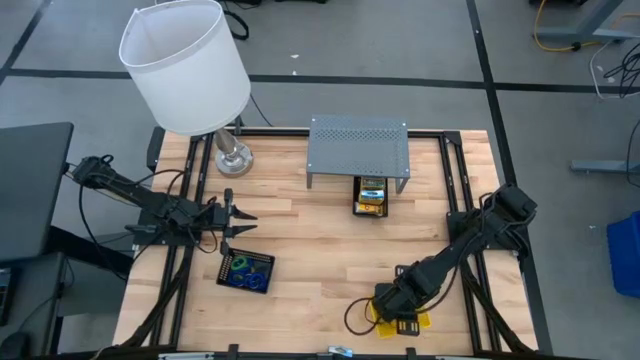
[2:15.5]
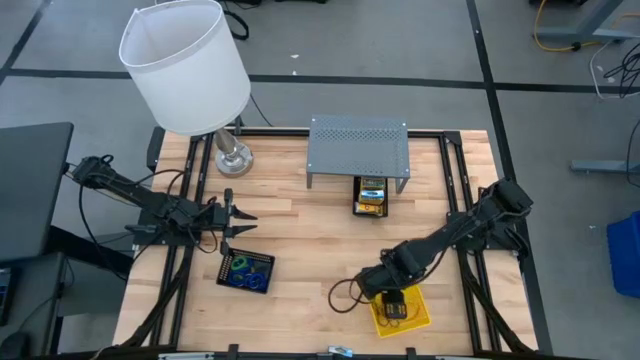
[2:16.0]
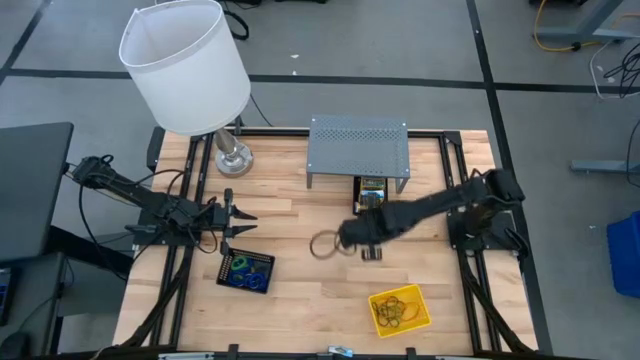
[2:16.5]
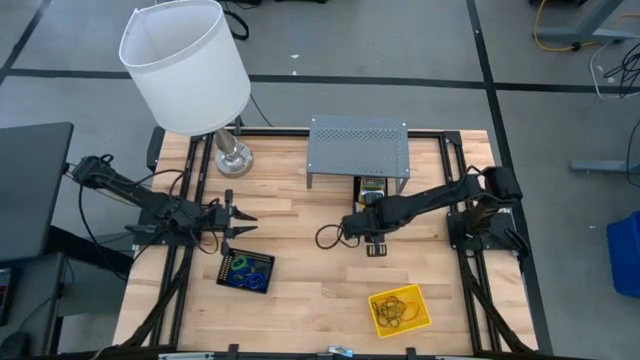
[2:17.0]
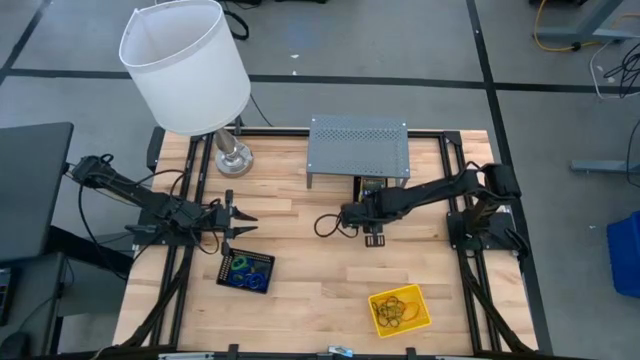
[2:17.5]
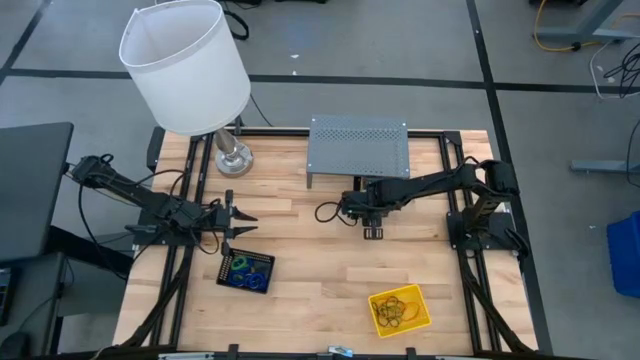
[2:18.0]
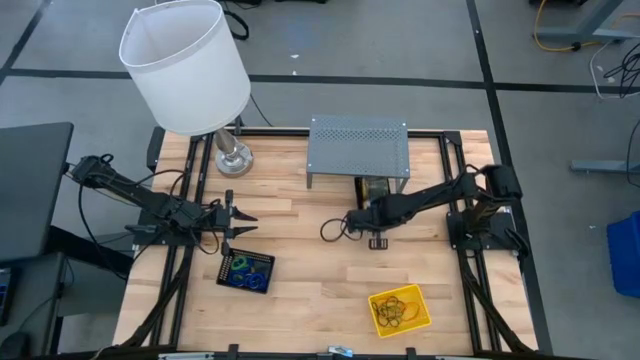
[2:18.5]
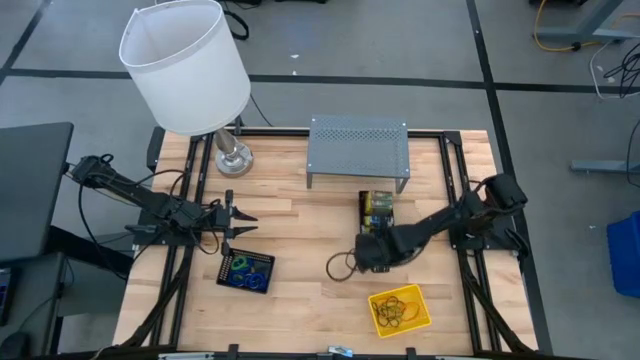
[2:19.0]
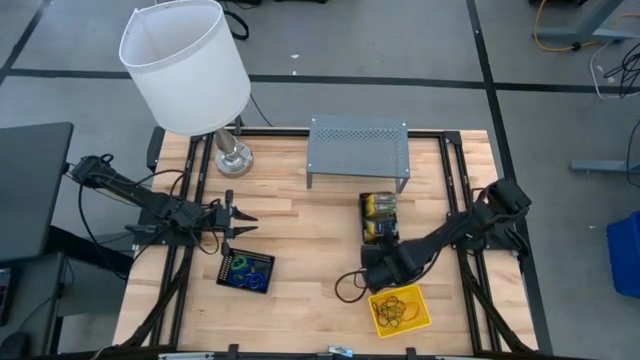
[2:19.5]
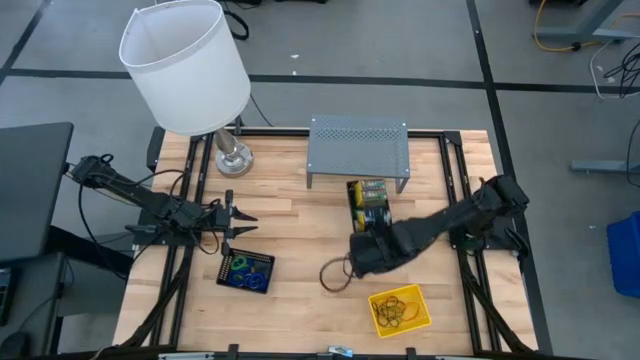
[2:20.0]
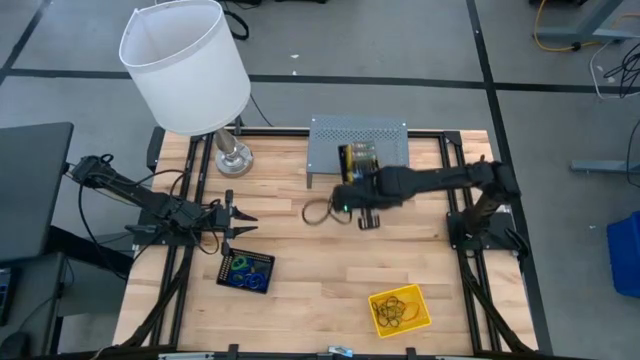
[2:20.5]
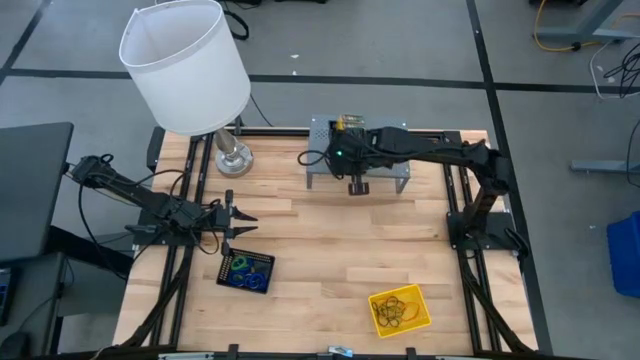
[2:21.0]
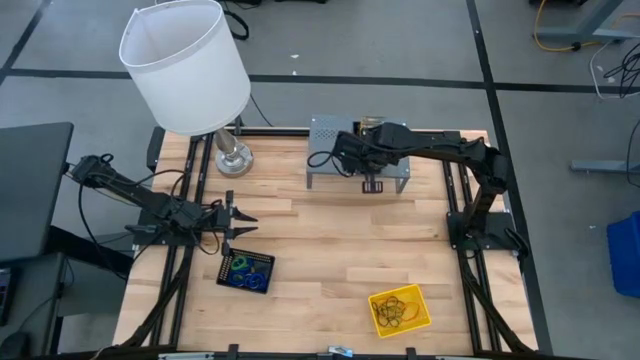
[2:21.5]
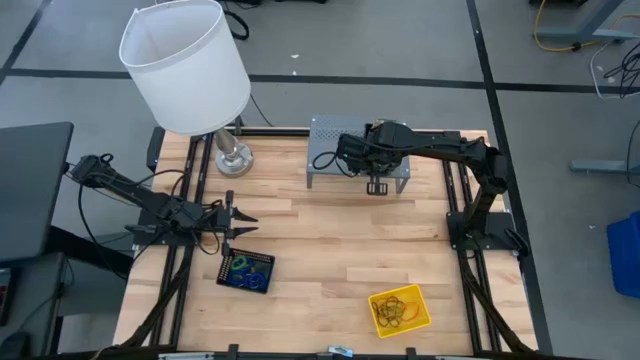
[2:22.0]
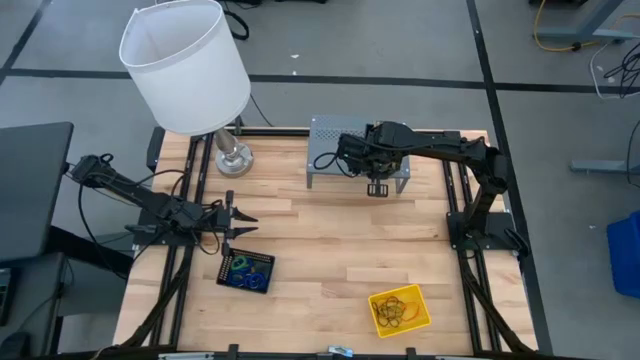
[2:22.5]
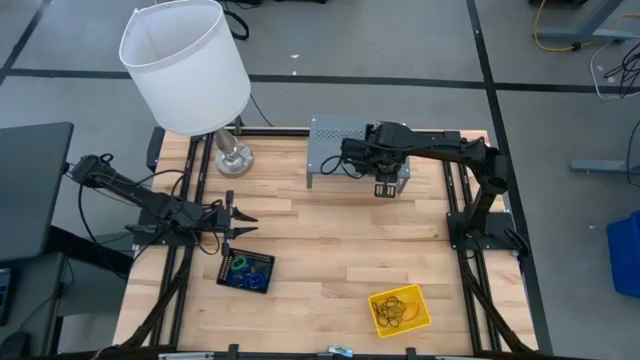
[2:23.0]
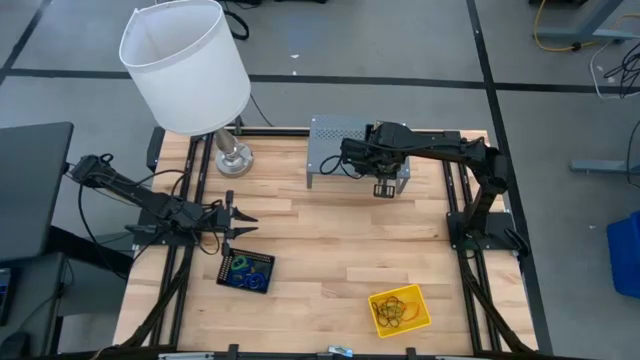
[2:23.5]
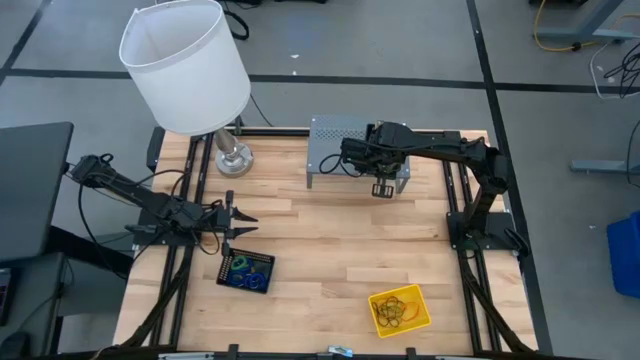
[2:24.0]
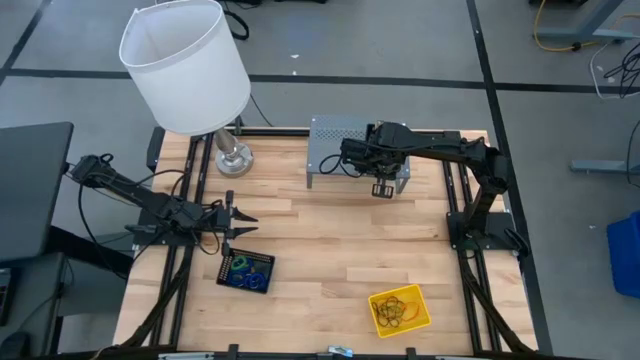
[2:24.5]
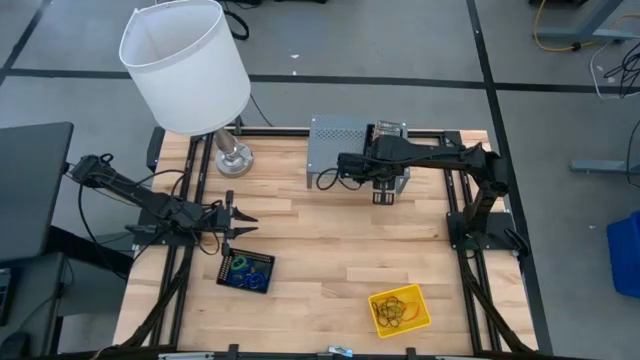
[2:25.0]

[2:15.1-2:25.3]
Task: Pick & Place Office Desk Supplies
Put the top black bin with crayon boxes on the shelf

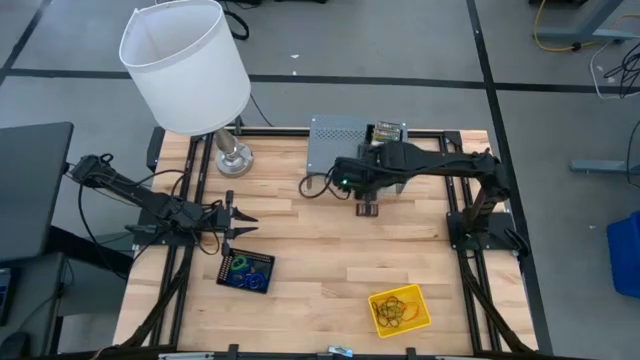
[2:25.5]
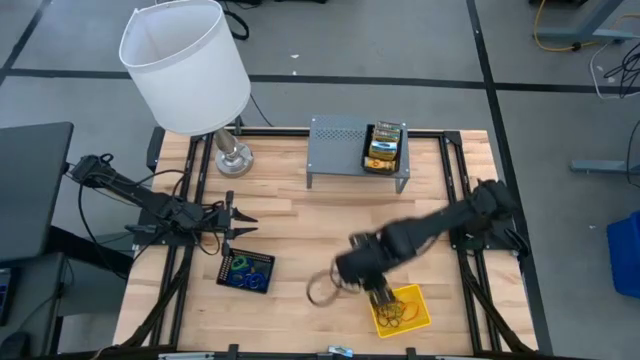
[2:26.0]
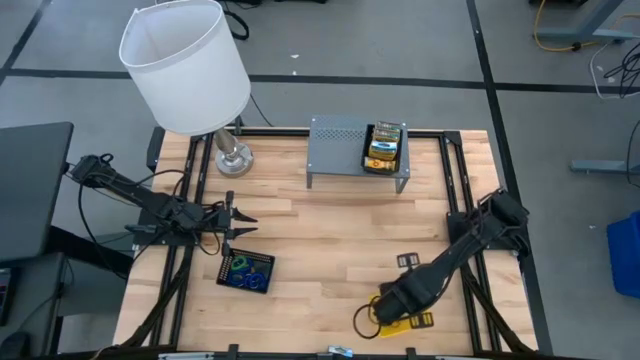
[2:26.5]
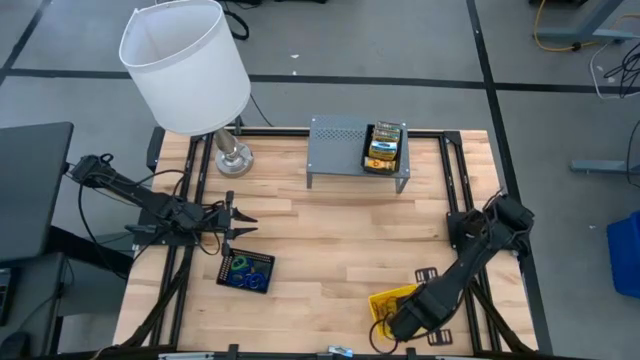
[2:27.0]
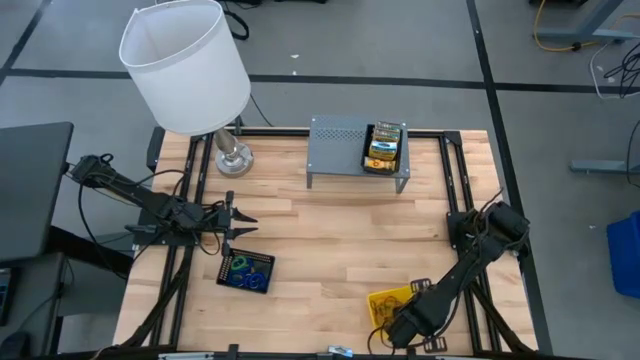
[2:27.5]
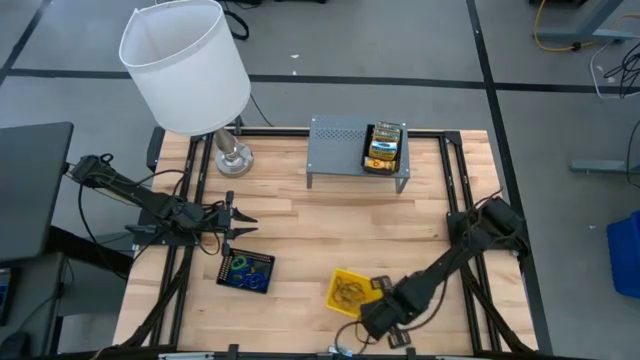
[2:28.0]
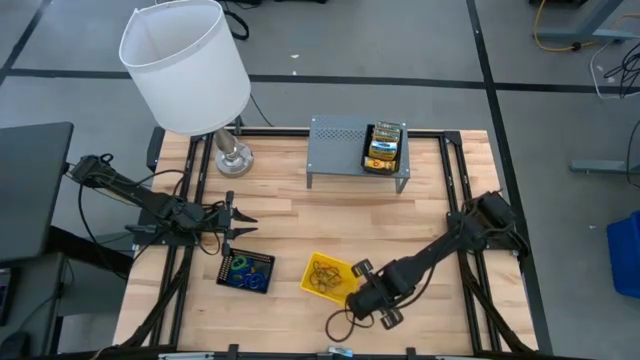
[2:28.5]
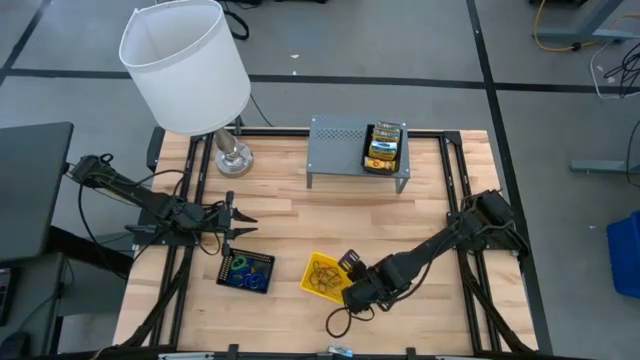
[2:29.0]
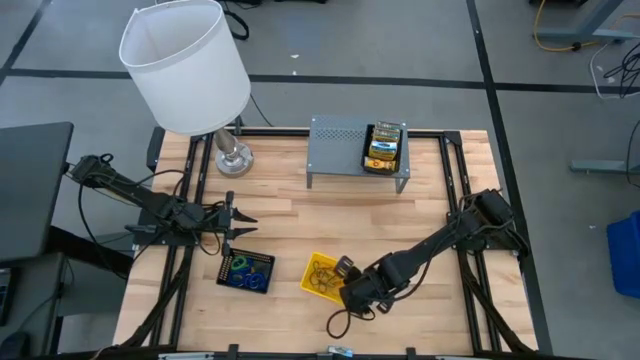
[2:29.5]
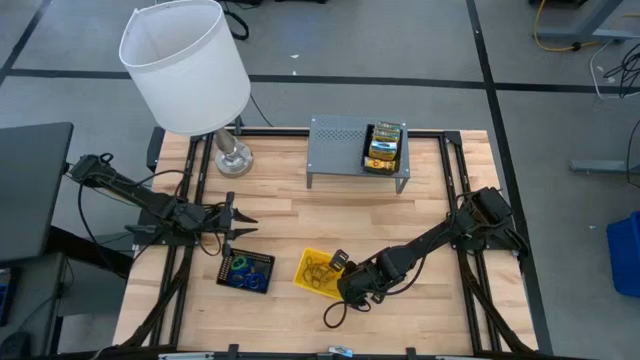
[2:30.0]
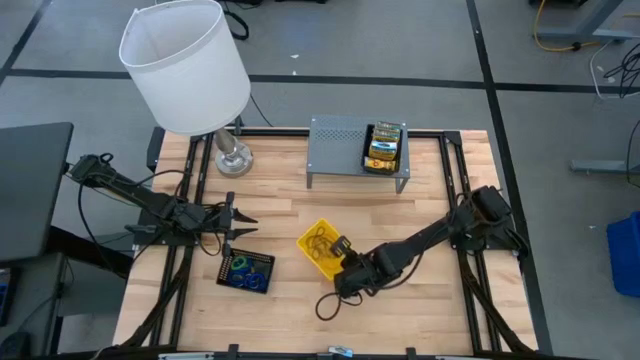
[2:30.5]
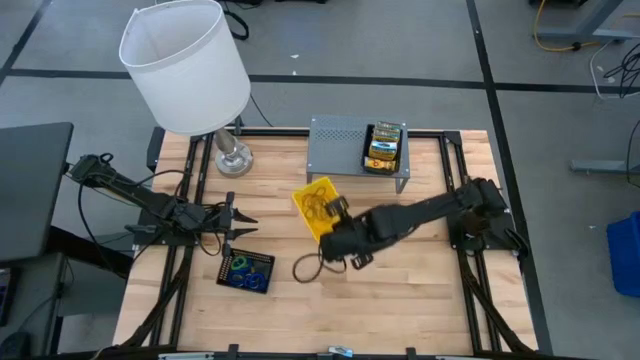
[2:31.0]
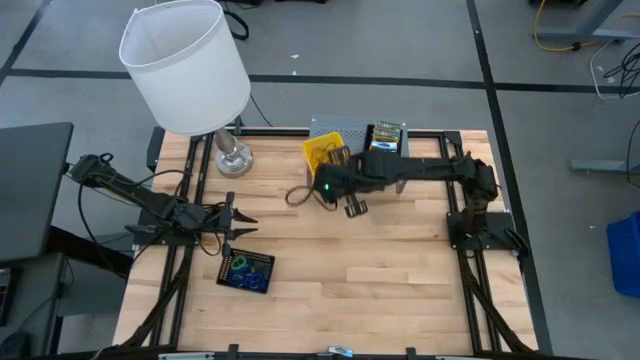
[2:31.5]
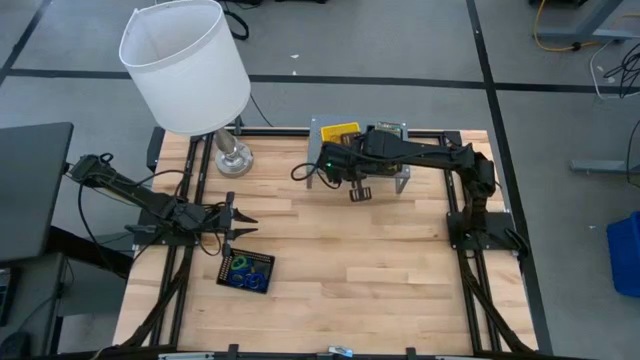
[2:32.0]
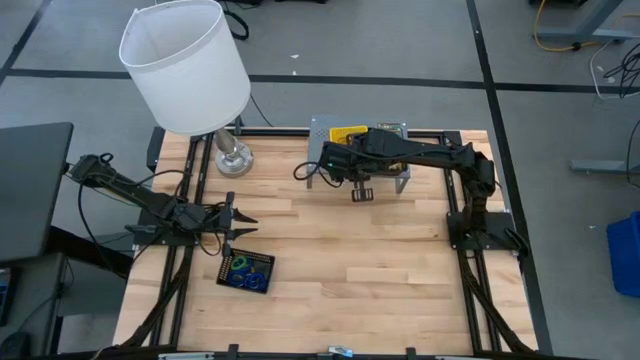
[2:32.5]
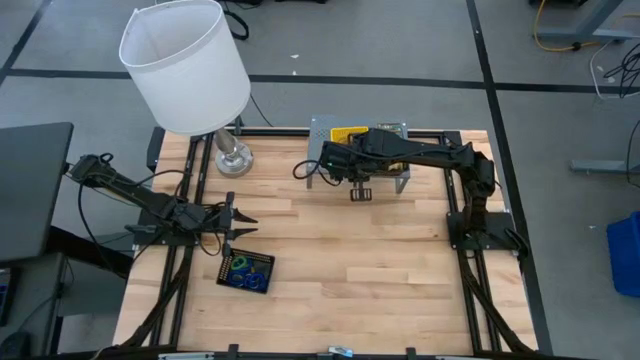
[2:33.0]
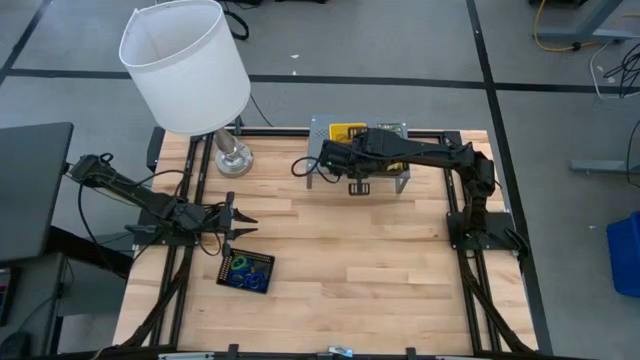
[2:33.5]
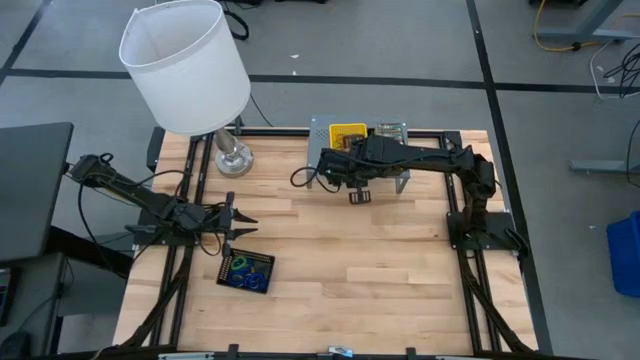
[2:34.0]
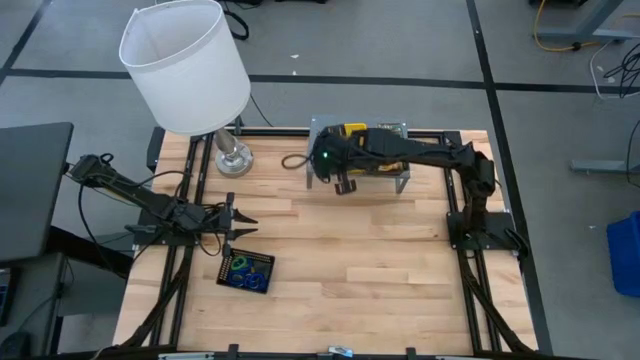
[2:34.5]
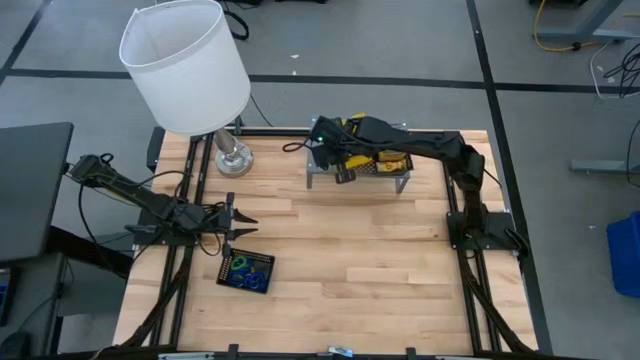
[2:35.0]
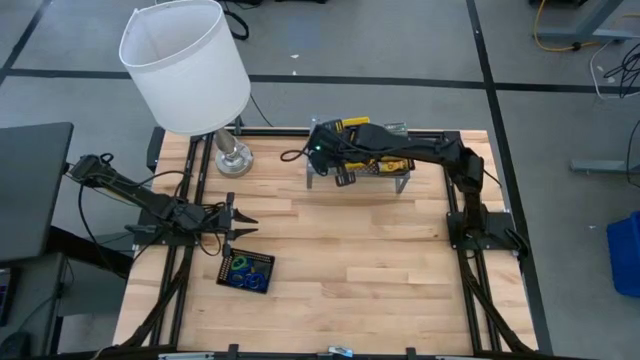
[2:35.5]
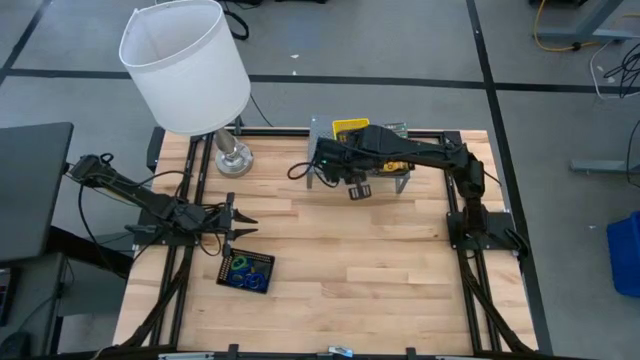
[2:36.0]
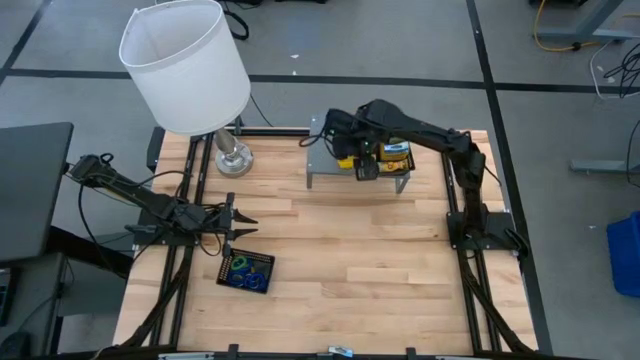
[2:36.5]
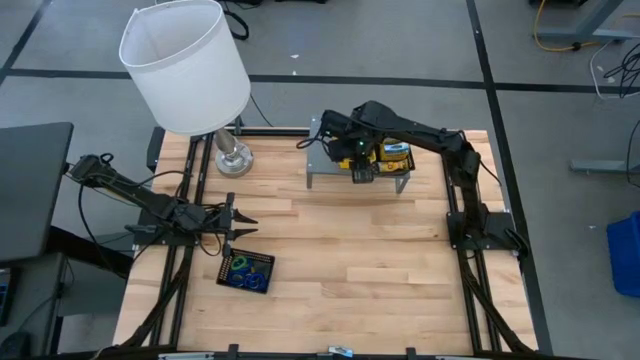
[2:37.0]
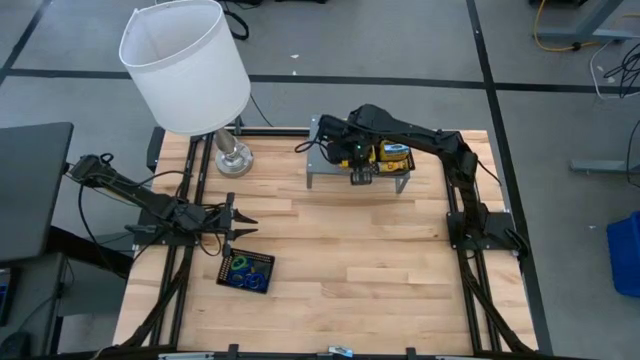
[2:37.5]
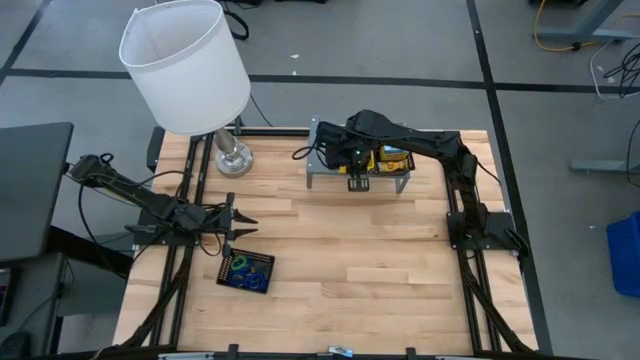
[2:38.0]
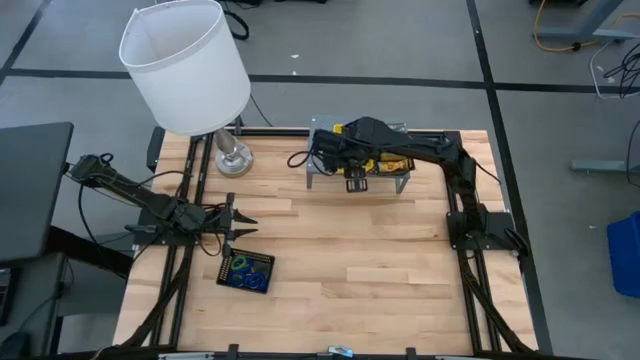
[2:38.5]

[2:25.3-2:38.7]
Put the yellow bin with rubber bands on the shelf
